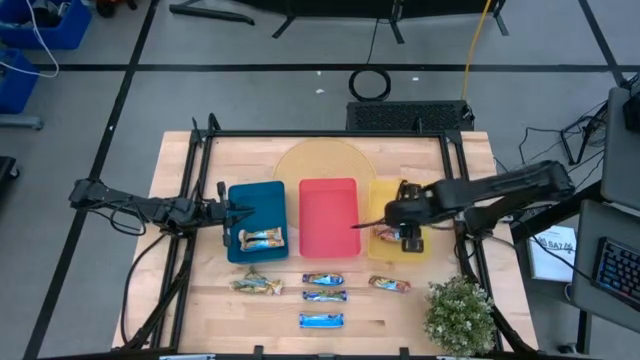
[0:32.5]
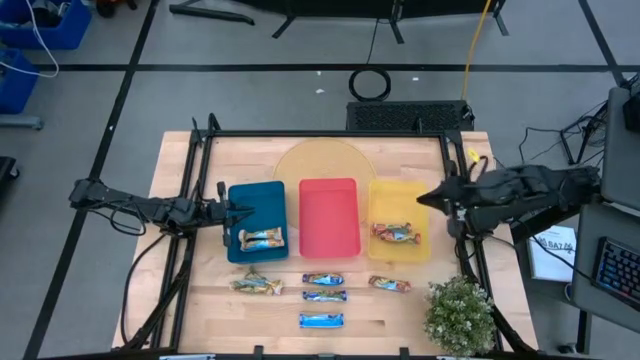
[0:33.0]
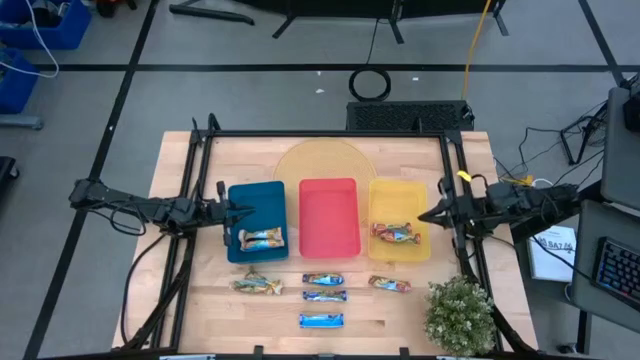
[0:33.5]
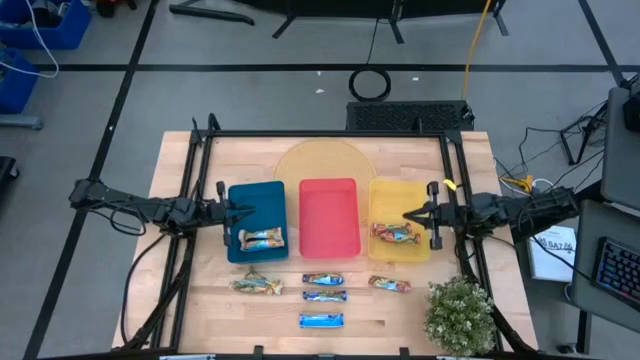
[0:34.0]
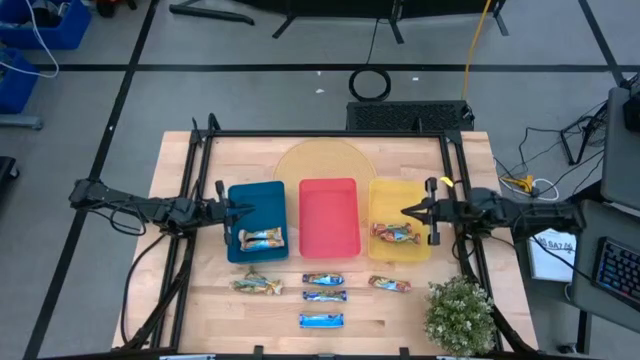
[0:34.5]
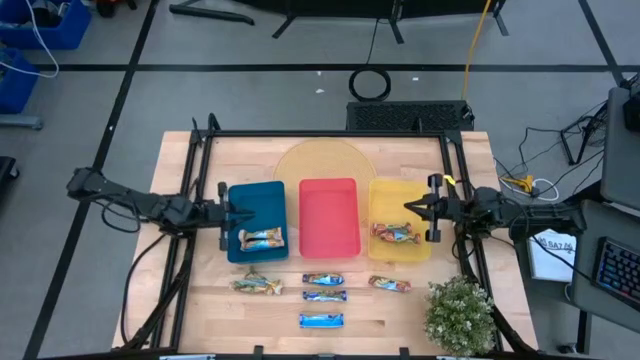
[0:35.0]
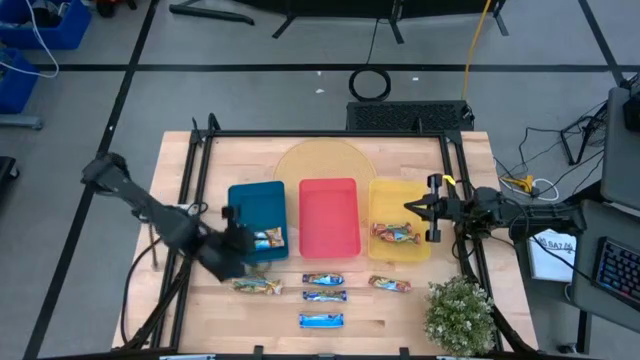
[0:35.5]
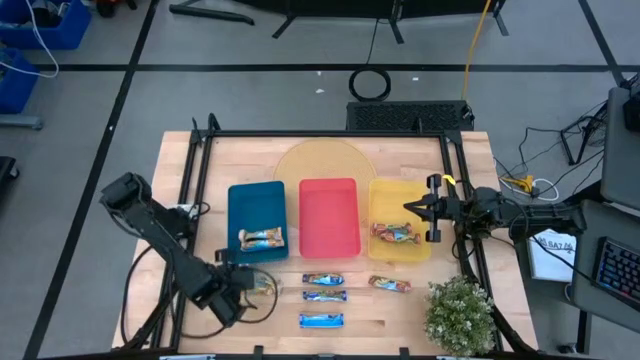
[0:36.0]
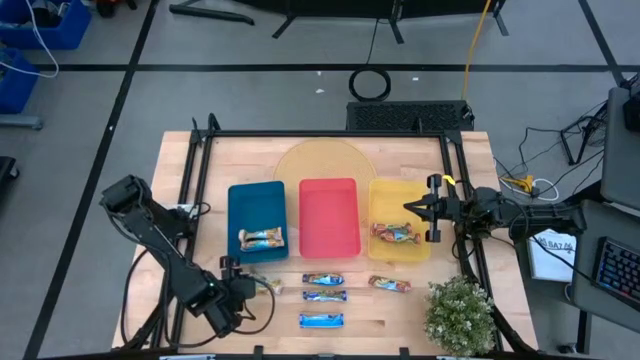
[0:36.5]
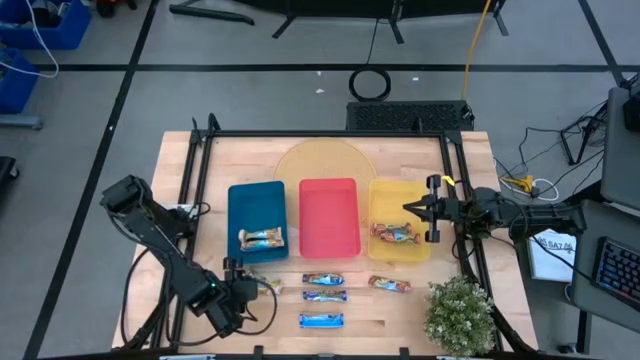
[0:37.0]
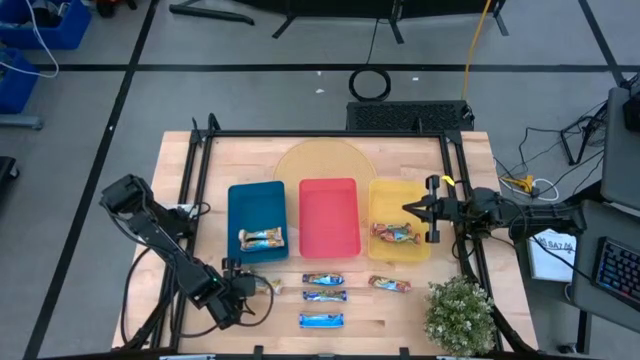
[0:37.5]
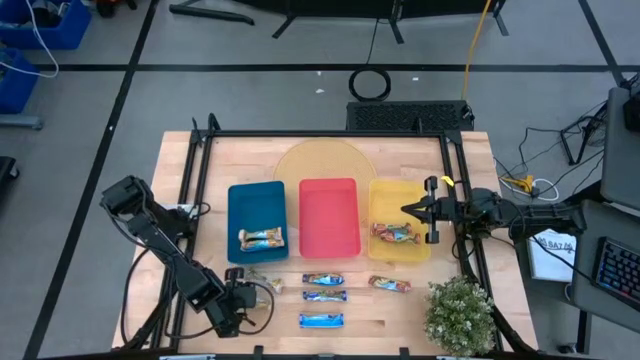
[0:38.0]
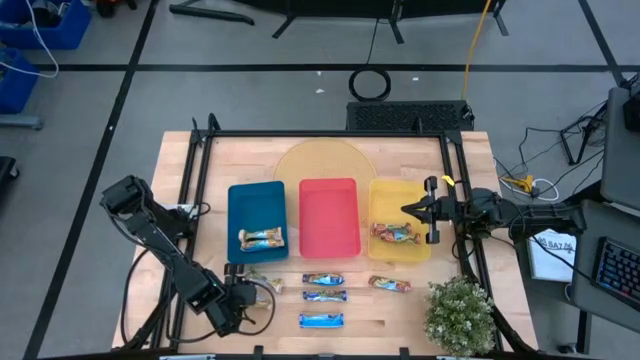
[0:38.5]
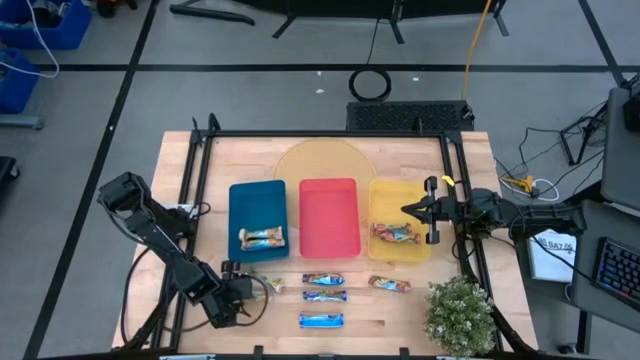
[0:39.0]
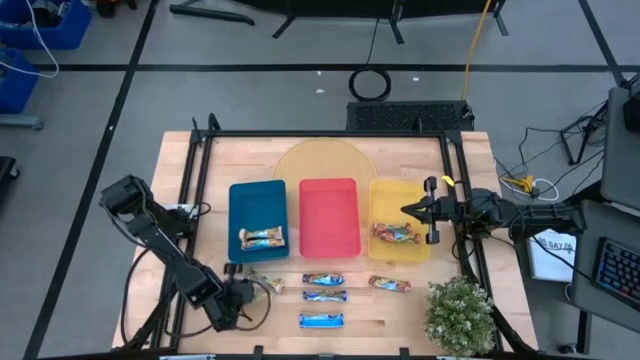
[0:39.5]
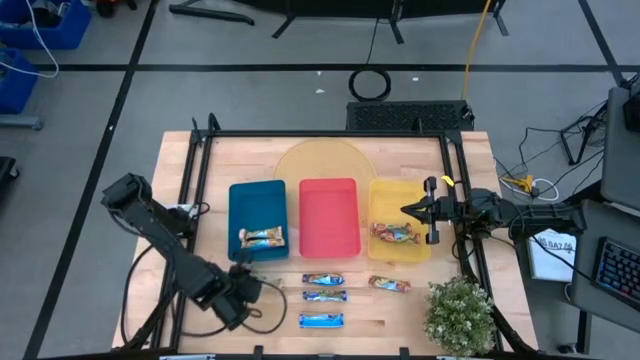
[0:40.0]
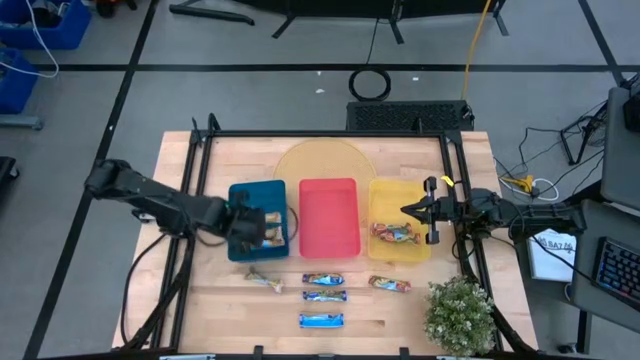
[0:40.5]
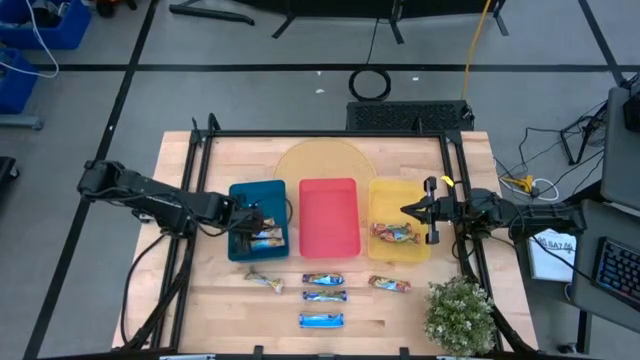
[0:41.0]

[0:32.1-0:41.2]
Task: Pick and place Granola Bars by type
Put the bottom green granola bar into the blue bin

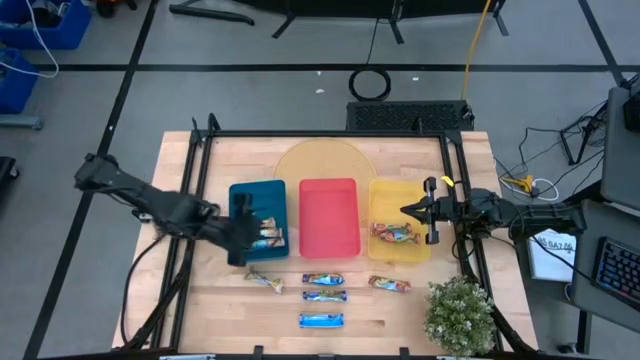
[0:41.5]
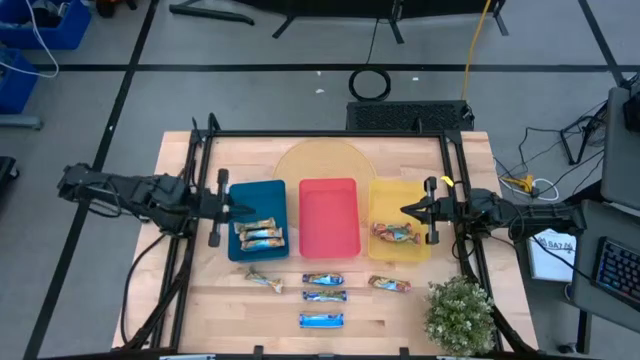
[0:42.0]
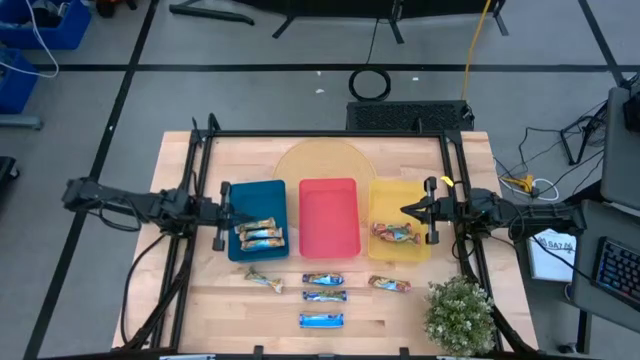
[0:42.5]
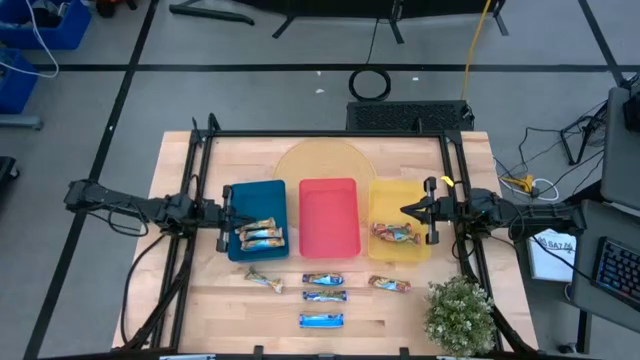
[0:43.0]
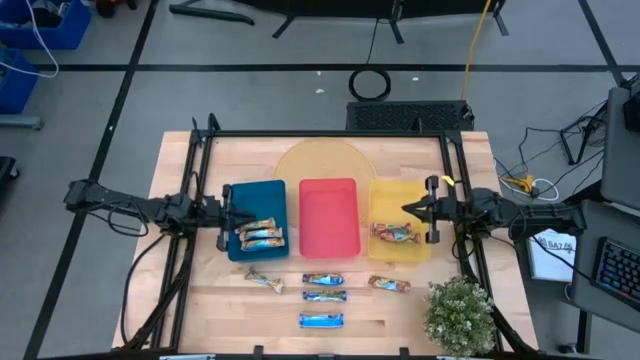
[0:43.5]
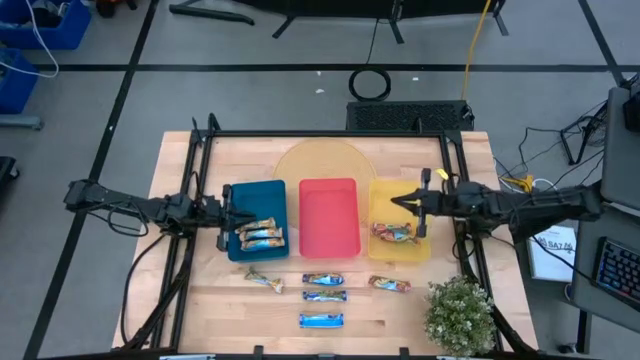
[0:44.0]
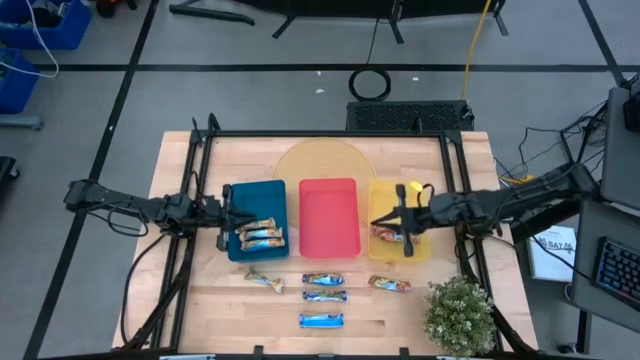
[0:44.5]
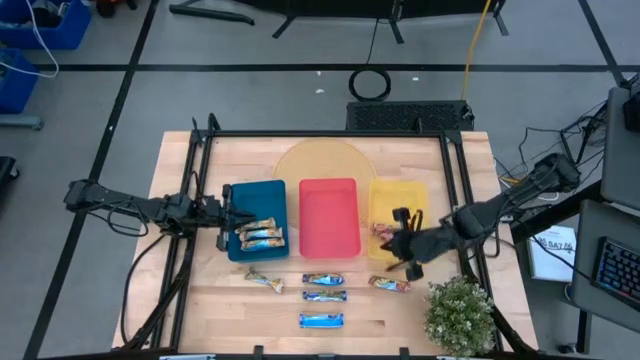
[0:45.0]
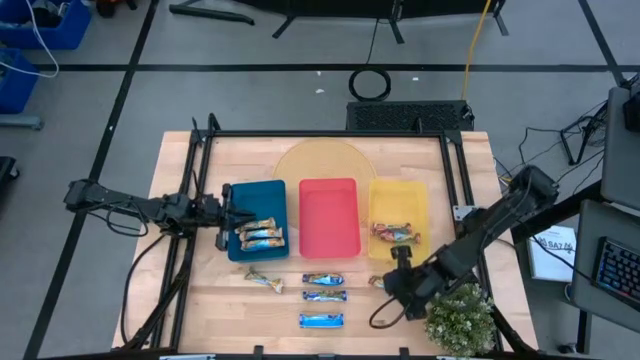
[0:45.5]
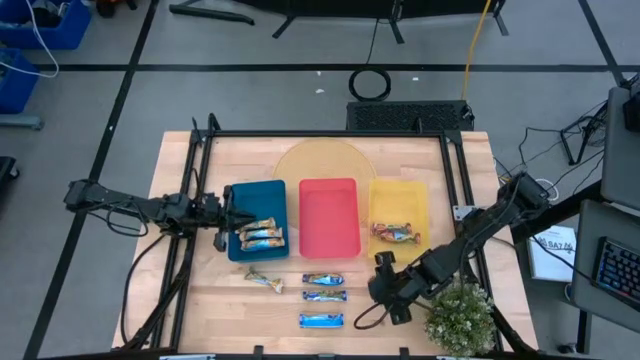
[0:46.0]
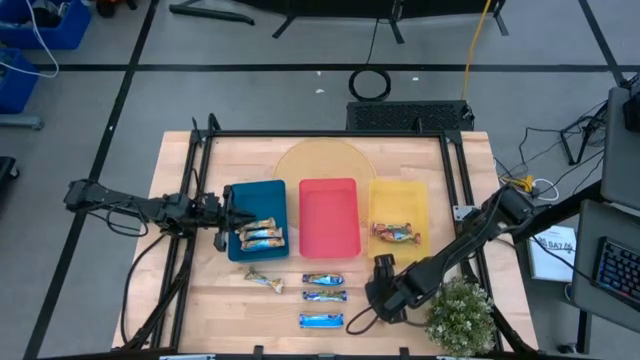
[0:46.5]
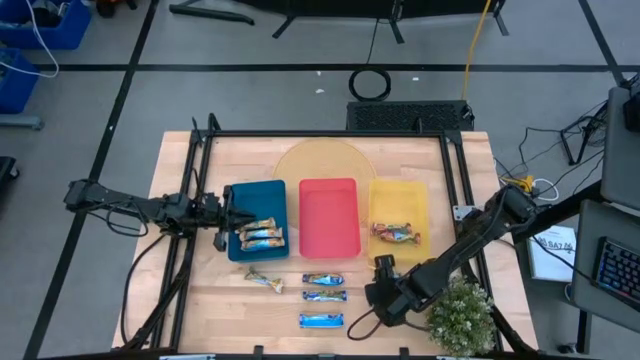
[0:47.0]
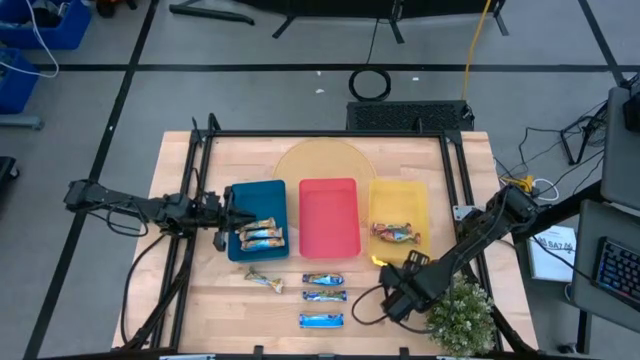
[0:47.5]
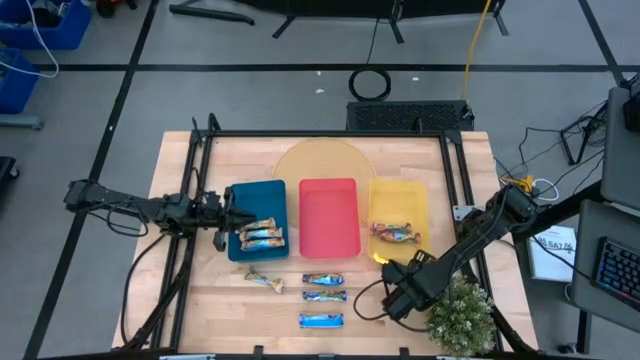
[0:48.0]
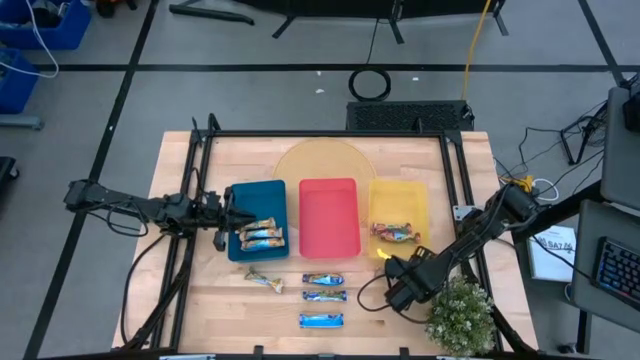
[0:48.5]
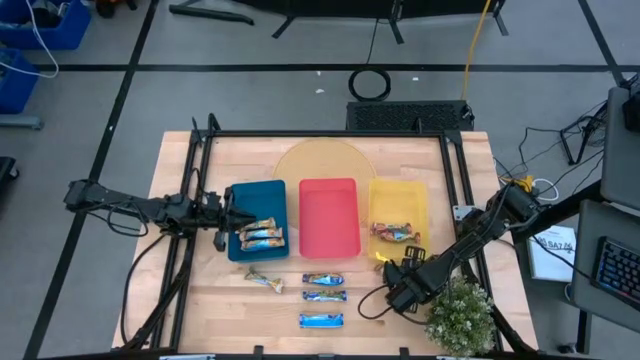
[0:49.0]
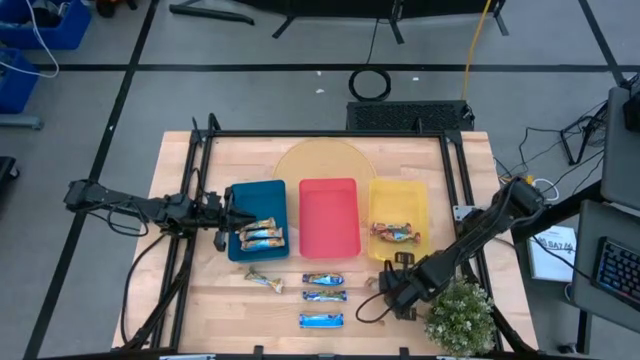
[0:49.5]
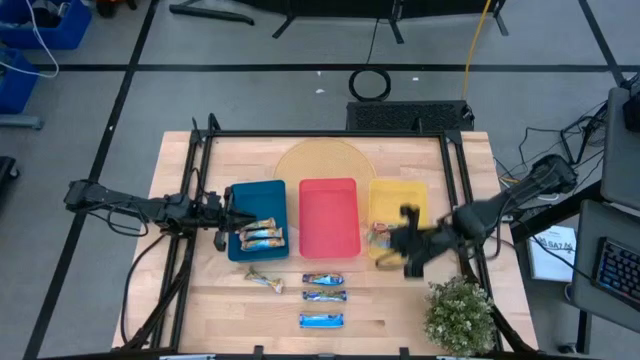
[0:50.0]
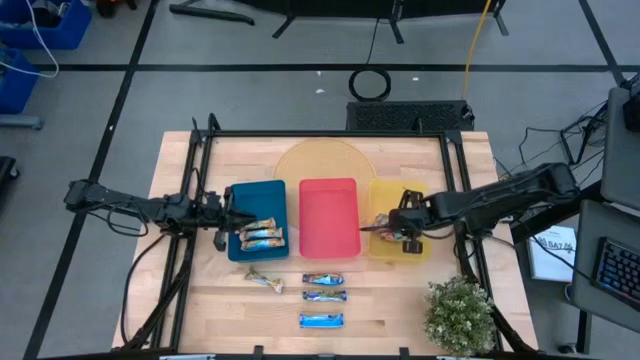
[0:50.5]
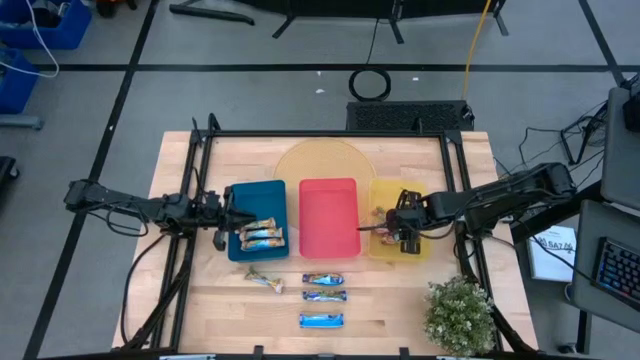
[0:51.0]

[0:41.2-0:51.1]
Put the red granola bar into the yellow bin

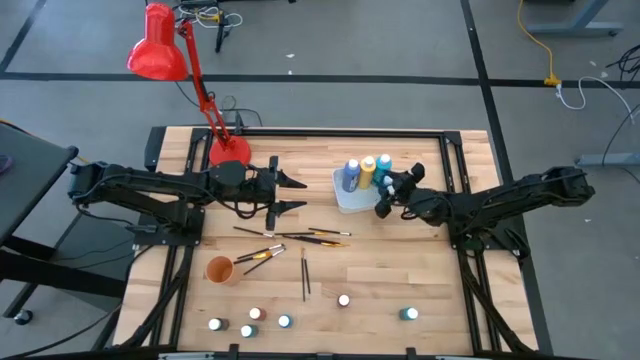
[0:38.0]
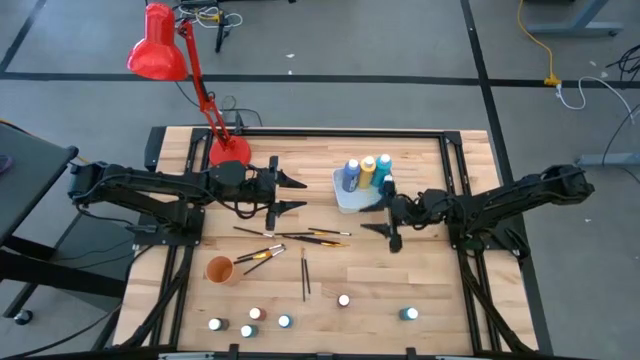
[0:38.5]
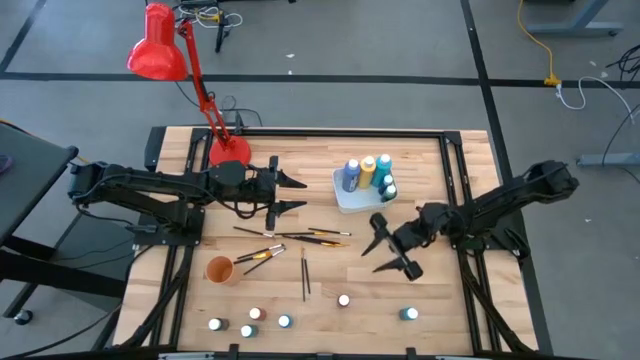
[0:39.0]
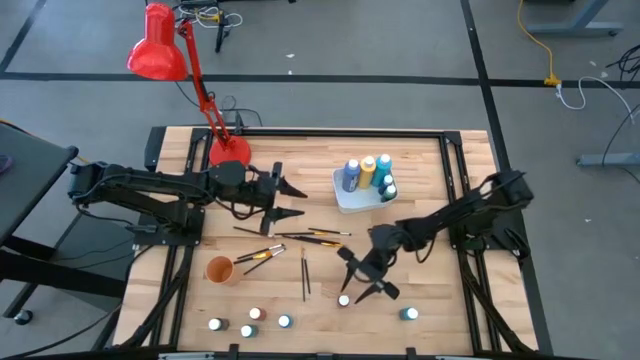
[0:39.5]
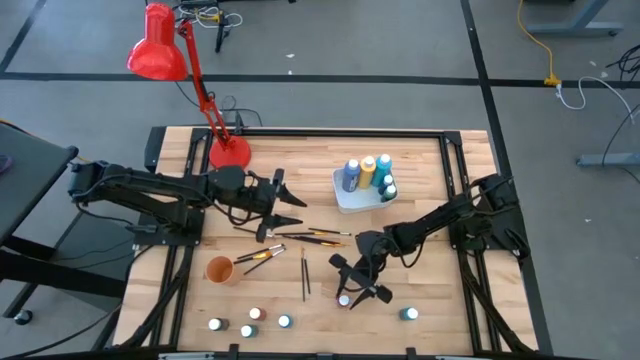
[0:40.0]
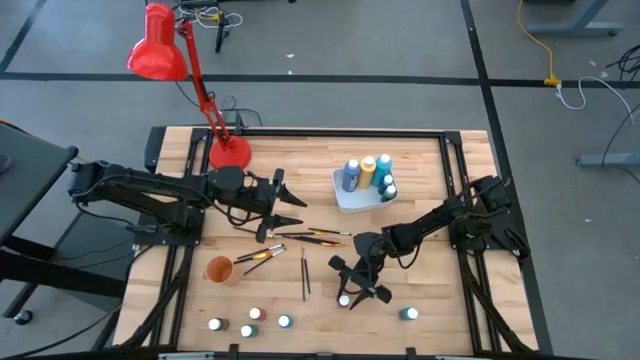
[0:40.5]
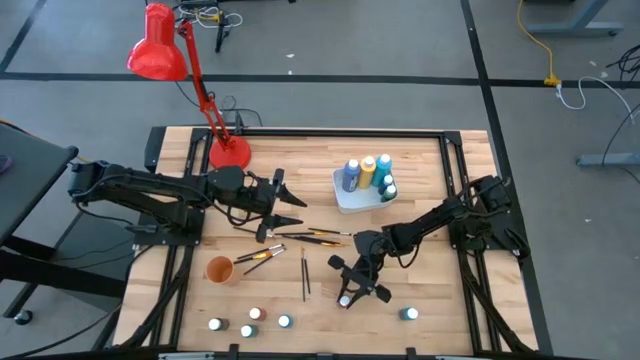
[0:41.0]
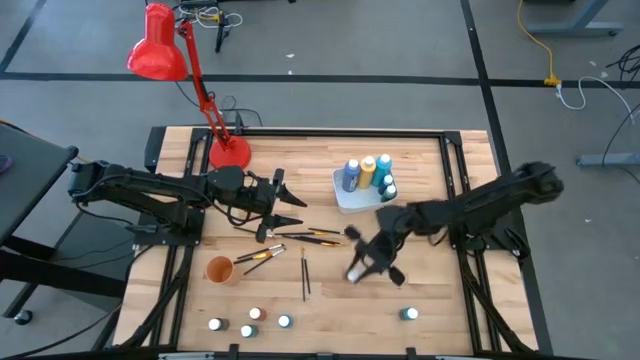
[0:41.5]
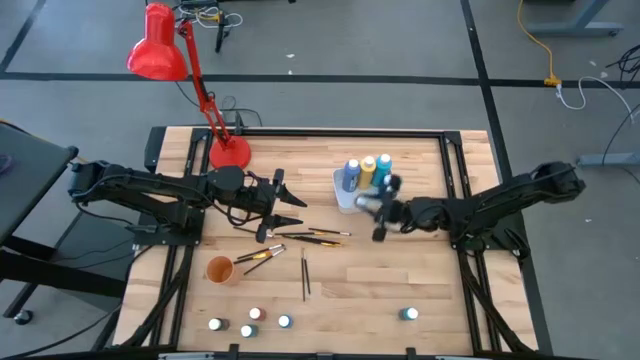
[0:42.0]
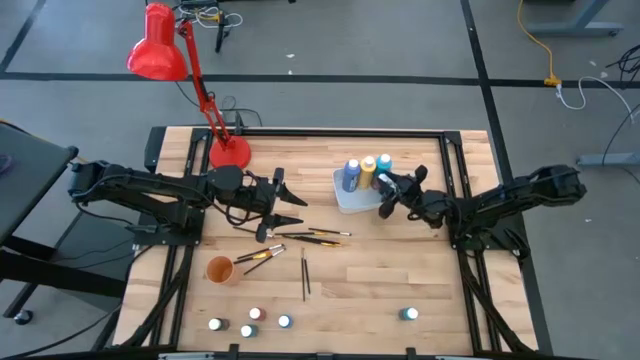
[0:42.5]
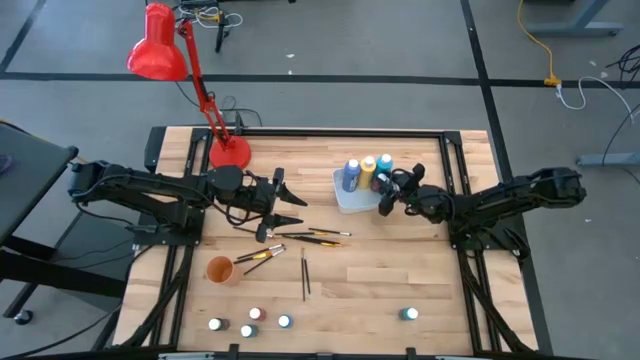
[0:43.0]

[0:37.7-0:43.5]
Task: Pick & Place Paint Supplies
Put the small red paint bottle into the white bin
